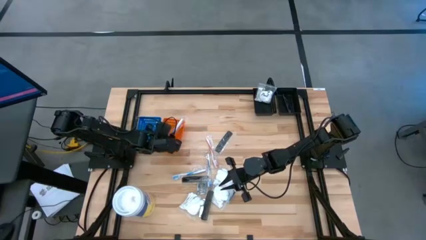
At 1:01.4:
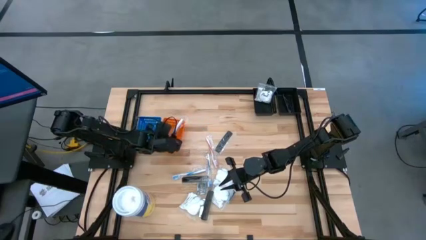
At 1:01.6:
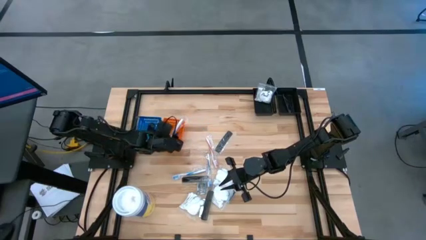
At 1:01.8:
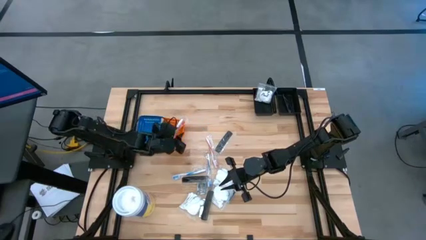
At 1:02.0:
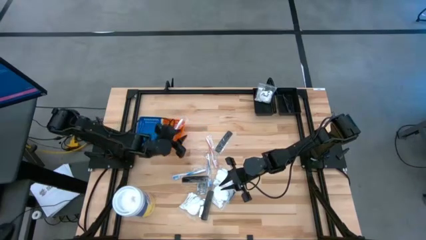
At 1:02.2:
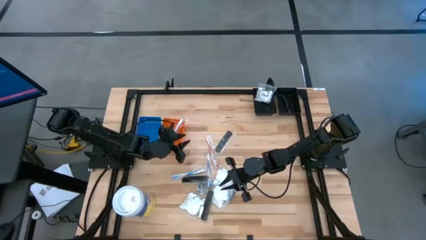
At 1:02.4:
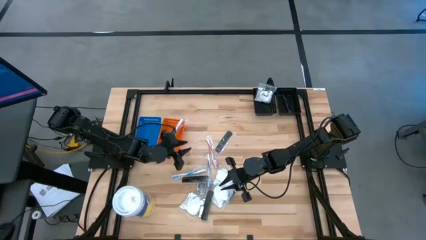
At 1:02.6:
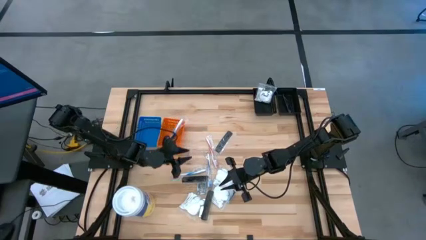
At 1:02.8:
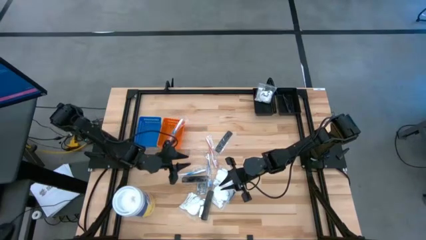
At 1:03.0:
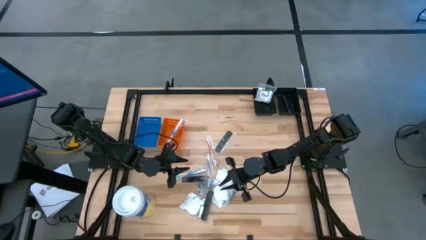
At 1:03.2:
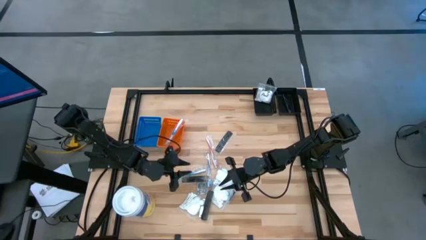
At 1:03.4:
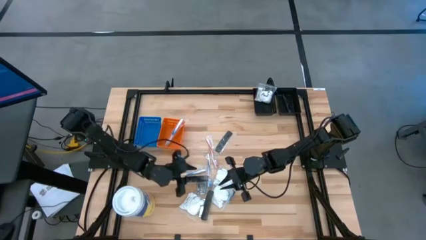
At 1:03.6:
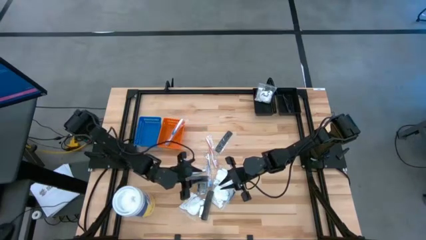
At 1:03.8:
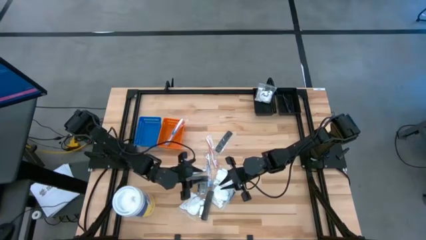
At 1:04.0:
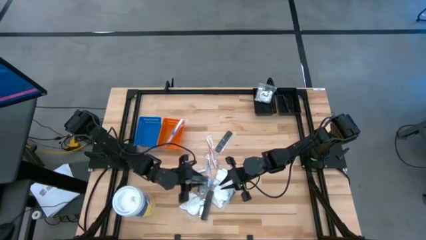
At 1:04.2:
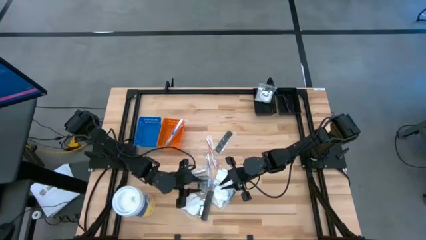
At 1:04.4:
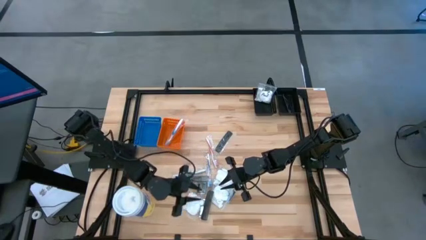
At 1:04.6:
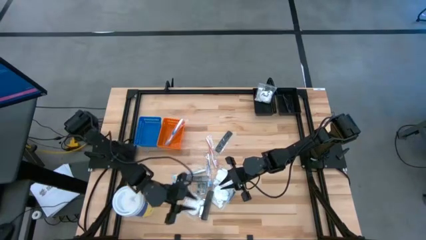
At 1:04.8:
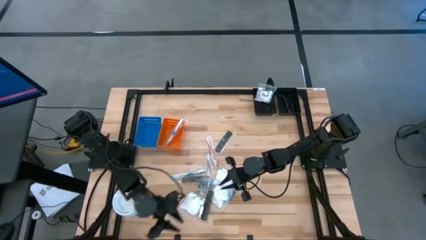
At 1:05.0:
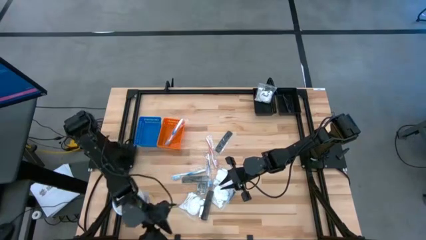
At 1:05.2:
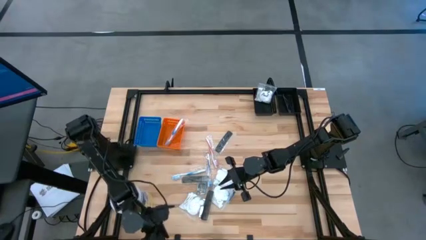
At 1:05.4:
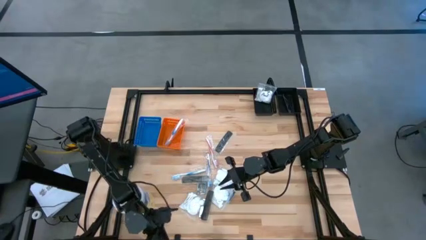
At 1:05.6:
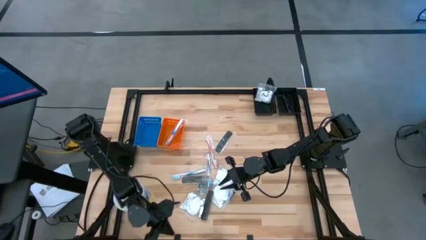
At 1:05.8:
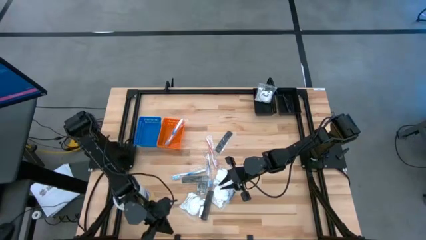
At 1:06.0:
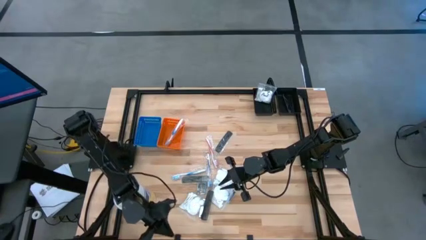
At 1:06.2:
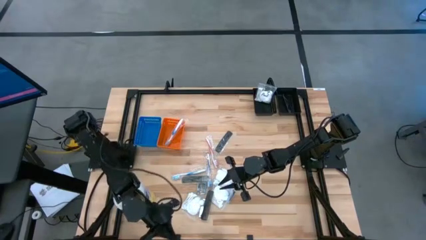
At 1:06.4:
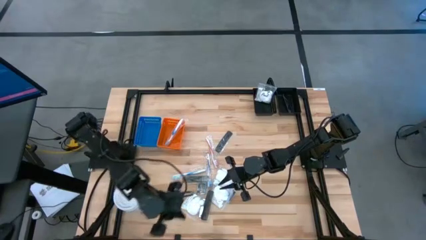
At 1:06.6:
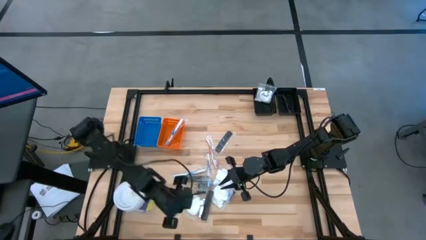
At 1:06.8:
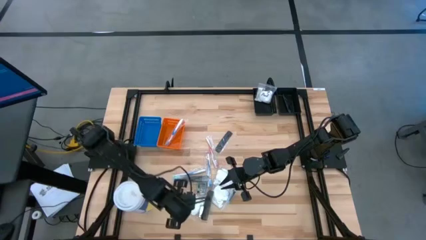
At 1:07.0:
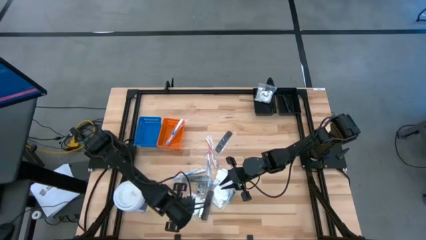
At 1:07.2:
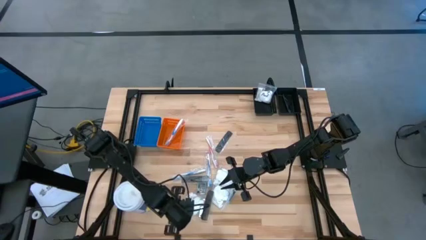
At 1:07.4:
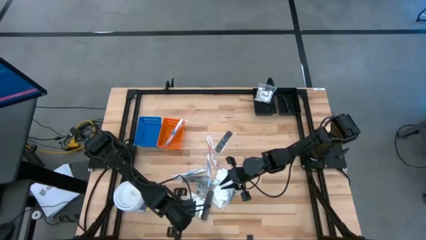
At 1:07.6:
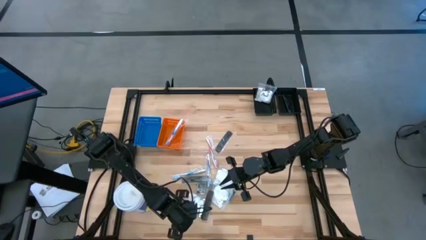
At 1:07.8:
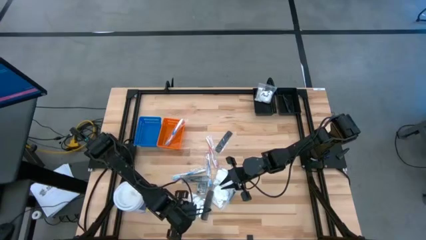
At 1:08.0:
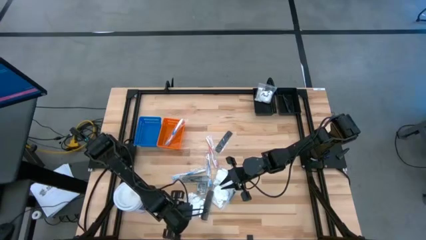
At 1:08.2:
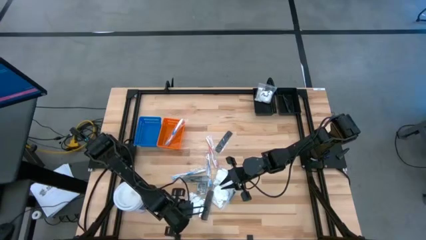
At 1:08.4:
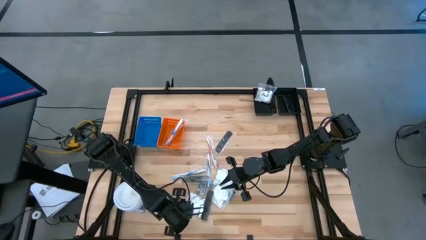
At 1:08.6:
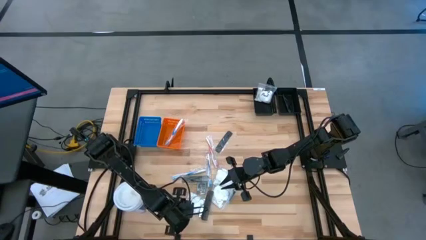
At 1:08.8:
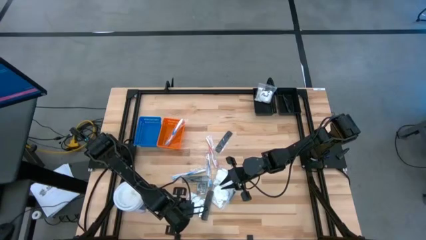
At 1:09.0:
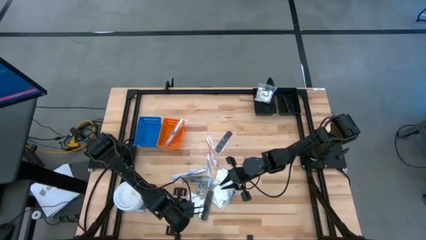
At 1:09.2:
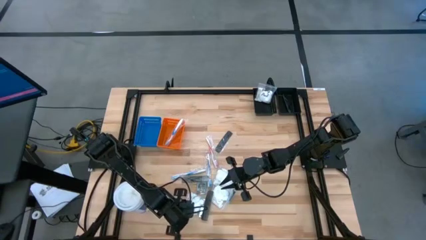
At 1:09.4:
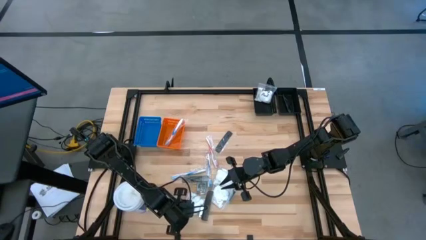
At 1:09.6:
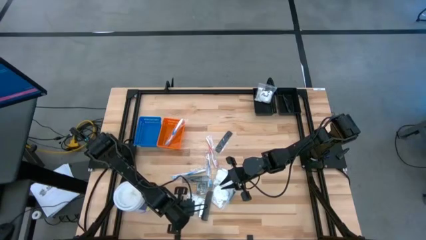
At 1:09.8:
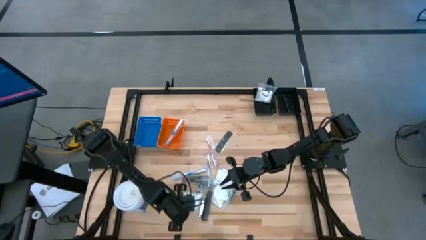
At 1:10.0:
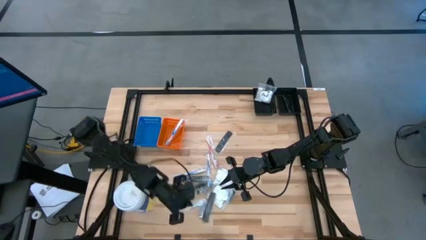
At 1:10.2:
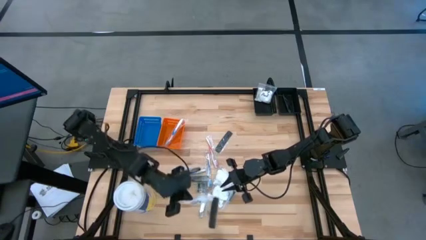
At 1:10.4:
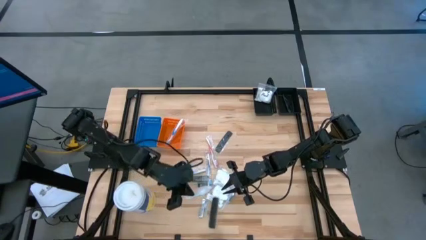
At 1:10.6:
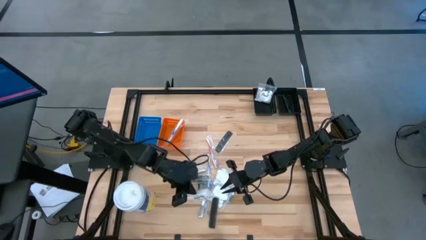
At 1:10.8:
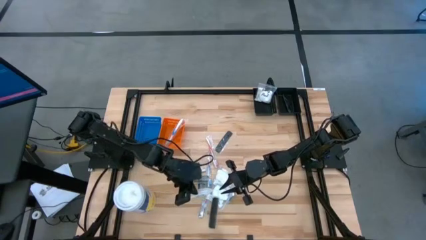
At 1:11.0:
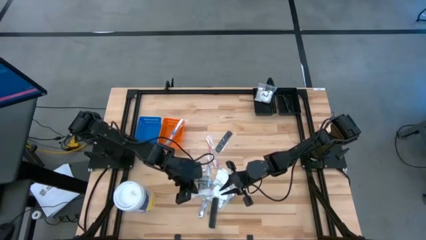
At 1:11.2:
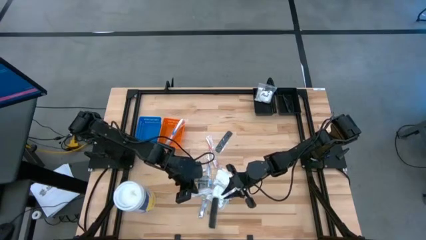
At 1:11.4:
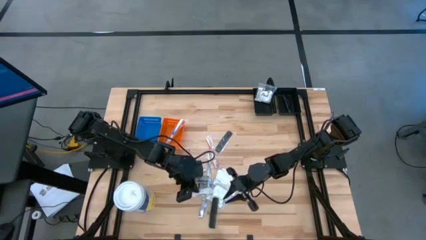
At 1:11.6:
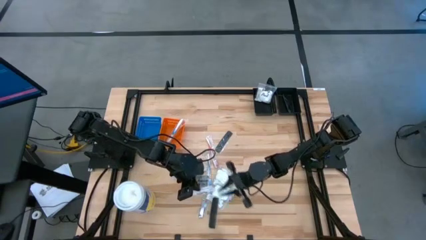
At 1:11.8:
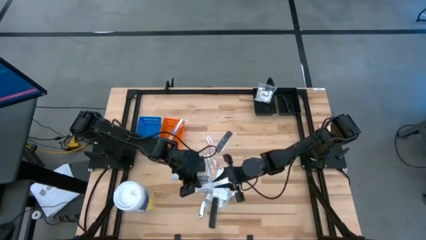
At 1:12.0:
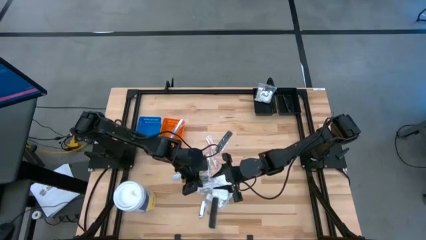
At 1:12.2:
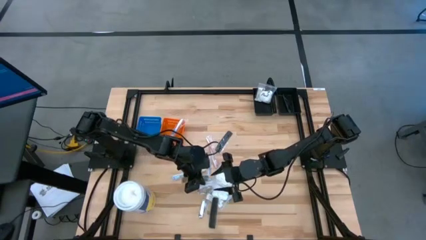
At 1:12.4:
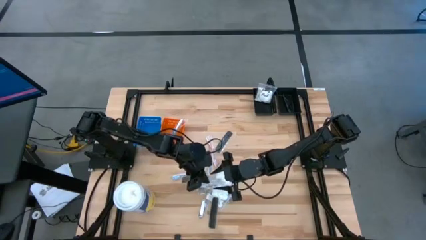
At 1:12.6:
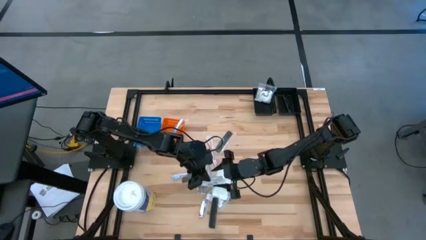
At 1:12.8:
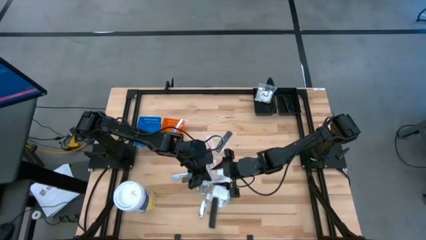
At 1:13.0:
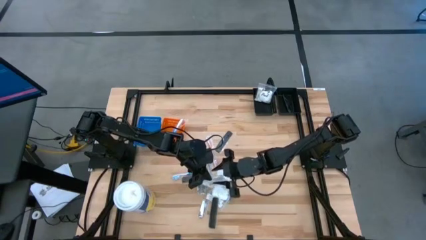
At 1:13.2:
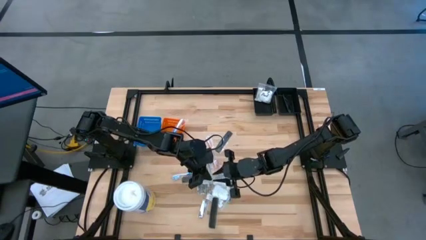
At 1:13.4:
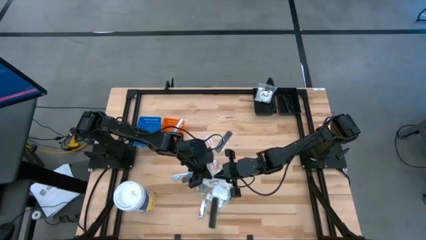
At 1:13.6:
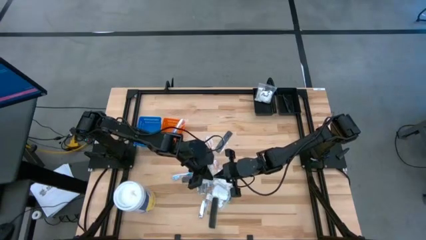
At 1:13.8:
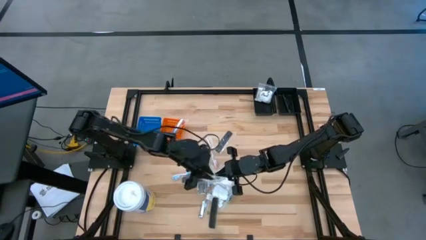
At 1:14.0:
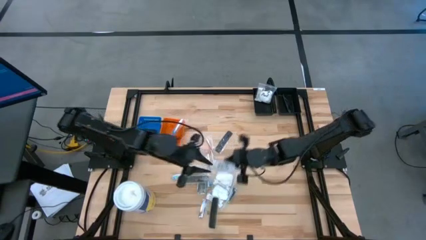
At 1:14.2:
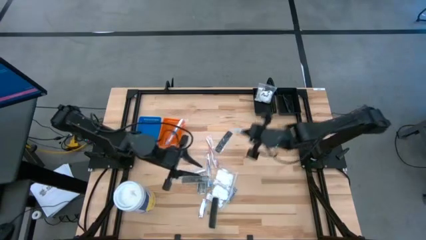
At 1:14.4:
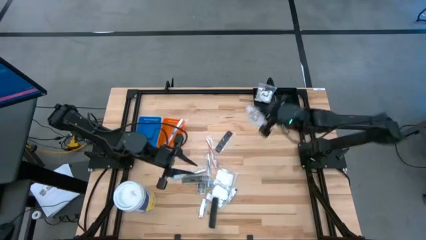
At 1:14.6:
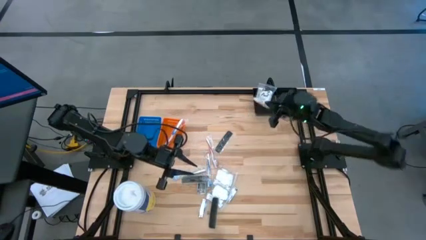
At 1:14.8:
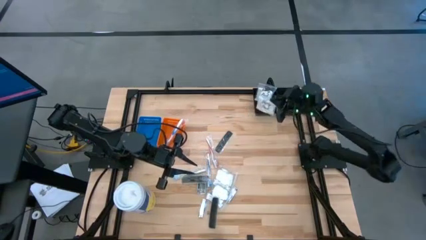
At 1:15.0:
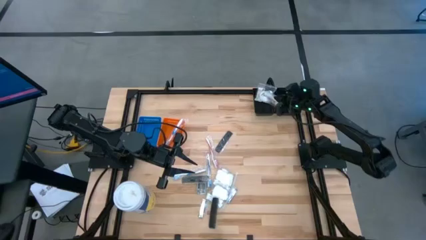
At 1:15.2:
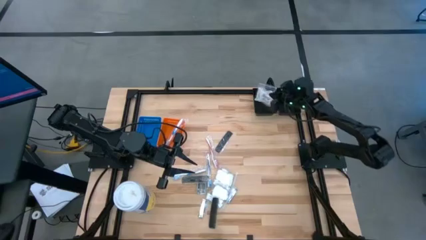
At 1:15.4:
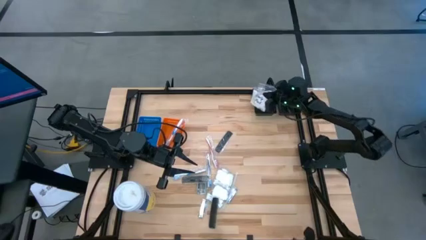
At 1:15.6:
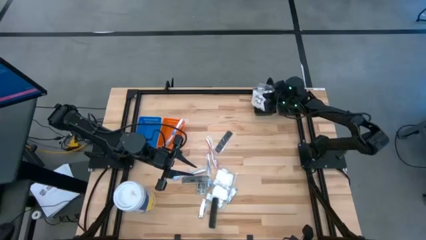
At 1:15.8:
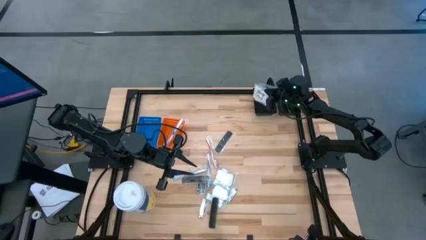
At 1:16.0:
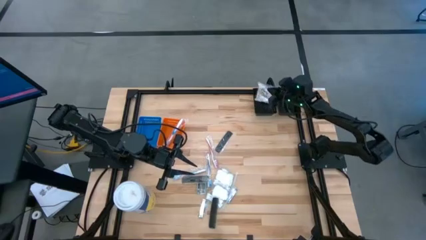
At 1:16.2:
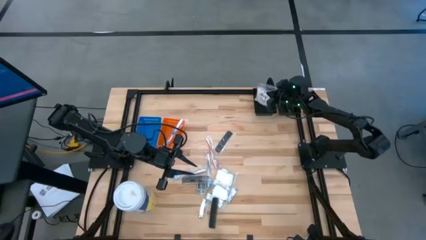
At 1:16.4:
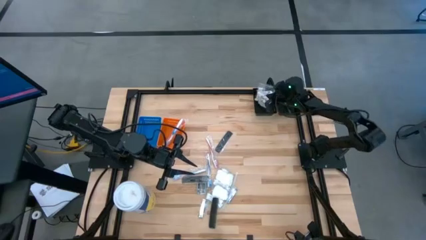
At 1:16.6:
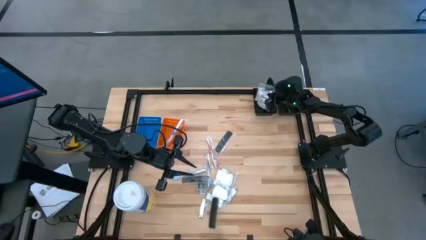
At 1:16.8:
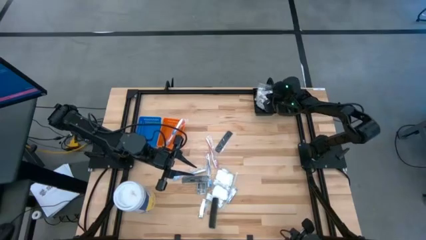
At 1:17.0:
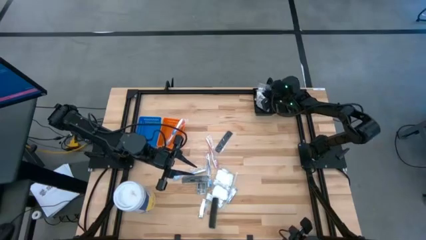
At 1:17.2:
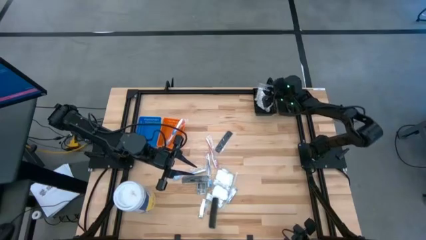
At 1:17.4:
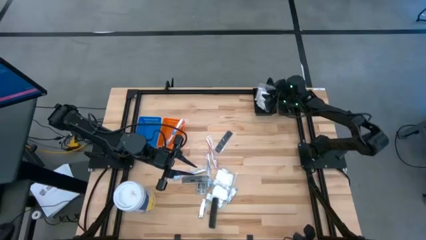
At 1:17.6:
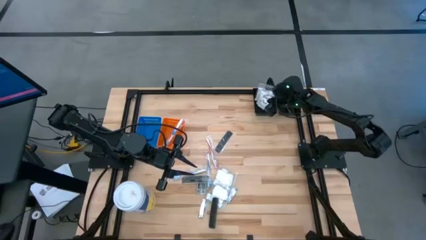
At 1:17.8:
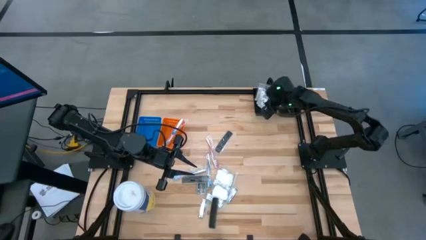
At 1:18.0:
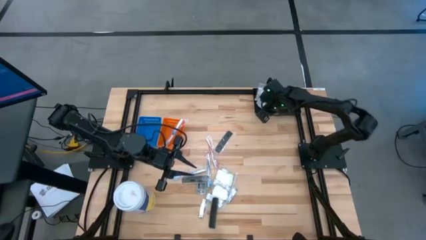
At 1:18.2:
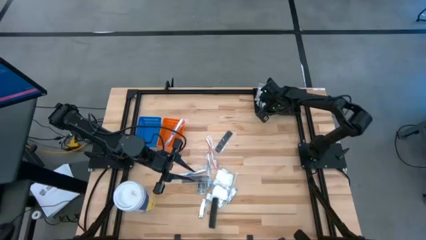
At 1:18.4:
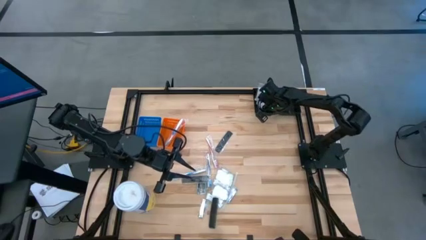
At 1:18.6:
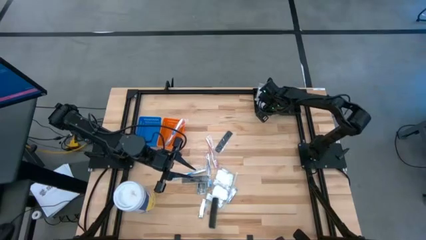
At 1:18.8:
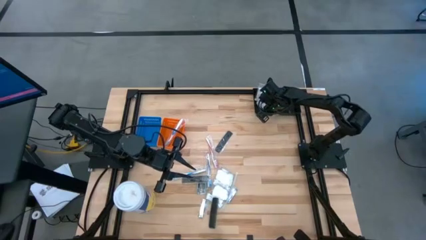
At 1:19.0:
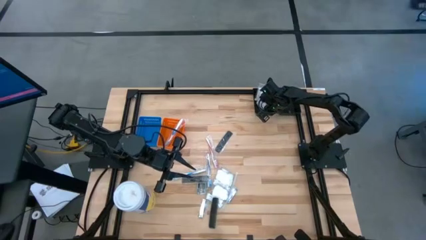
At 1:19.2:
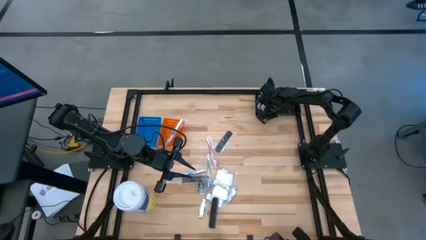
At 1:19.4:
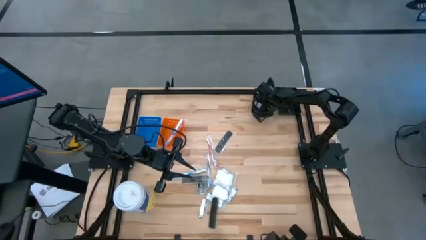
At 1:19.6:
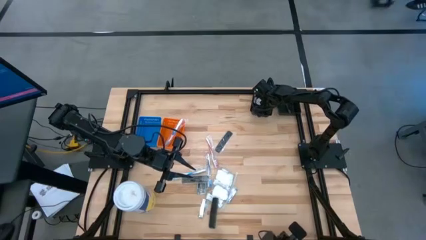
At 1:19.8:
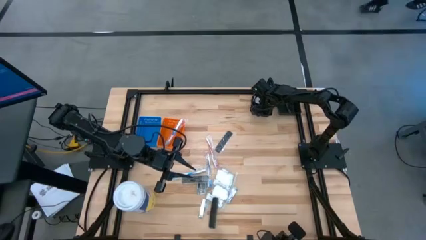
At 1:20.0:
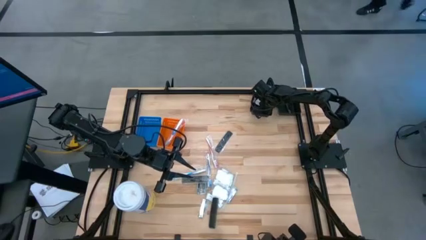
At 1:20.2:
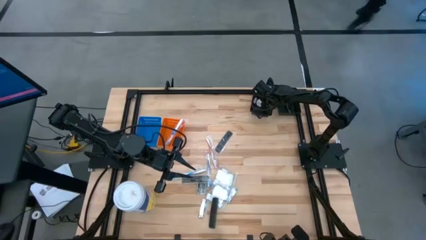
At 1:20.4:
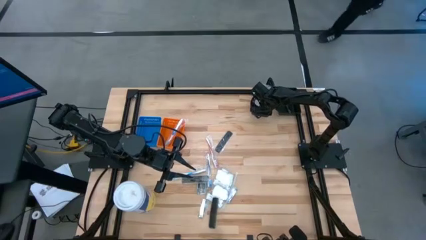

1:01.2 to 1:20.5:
Task: Pick & Place Travel size toiletries
Put the cotton pack into the left black bin
